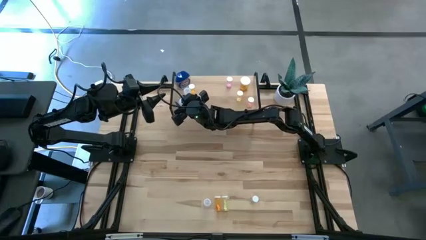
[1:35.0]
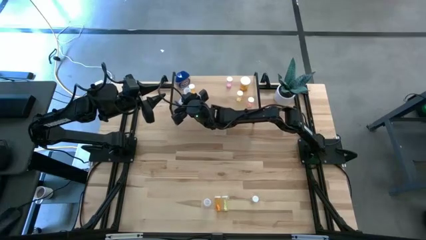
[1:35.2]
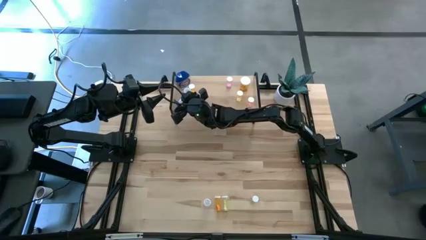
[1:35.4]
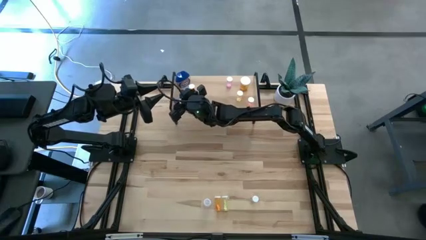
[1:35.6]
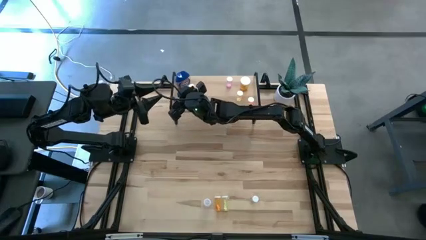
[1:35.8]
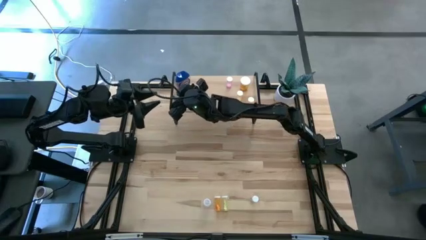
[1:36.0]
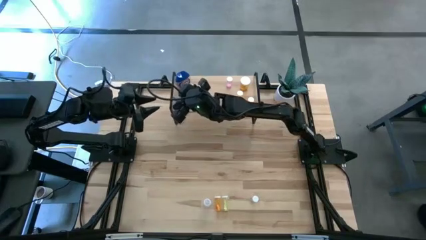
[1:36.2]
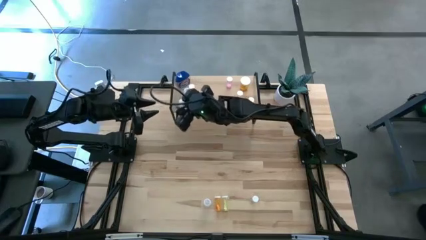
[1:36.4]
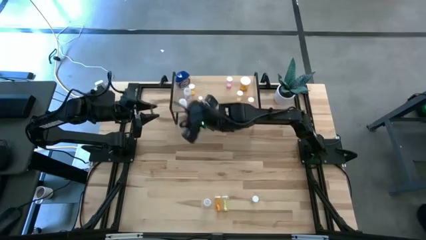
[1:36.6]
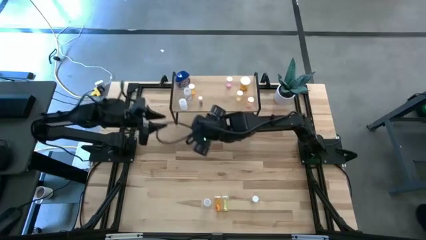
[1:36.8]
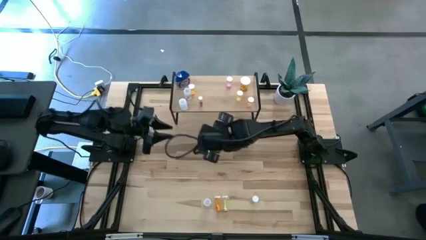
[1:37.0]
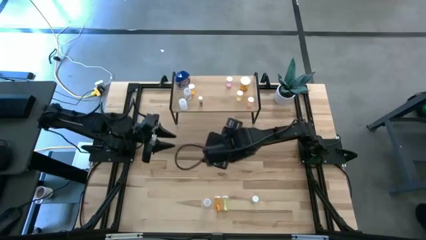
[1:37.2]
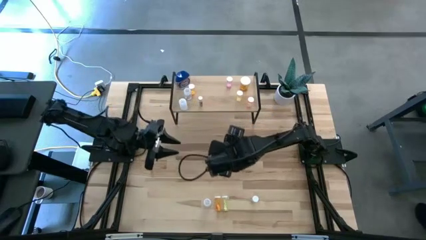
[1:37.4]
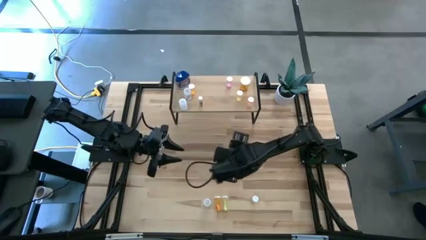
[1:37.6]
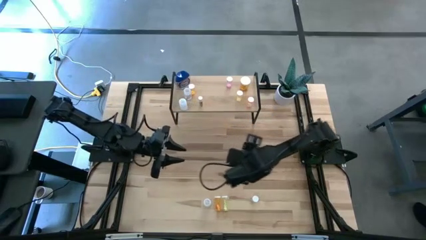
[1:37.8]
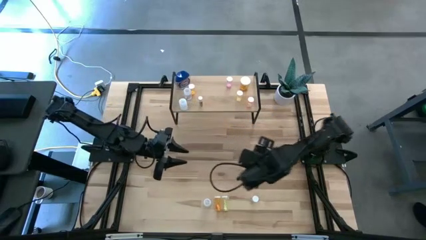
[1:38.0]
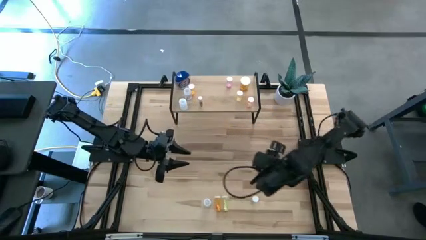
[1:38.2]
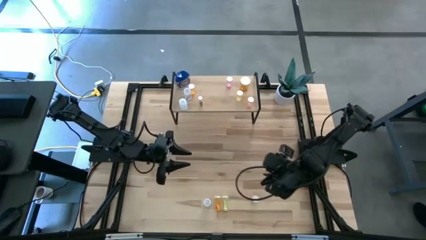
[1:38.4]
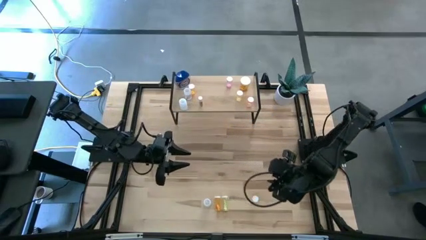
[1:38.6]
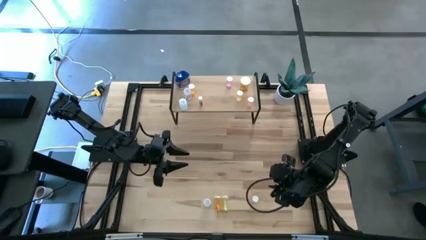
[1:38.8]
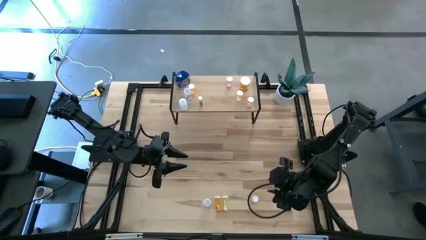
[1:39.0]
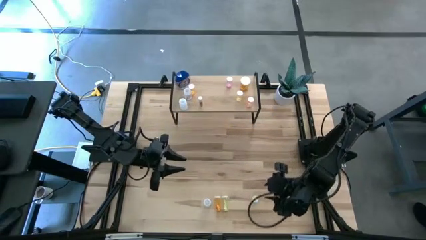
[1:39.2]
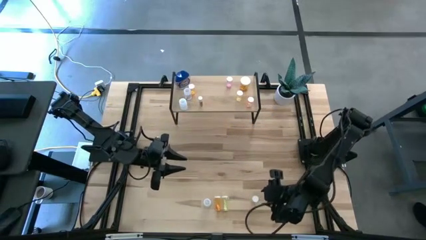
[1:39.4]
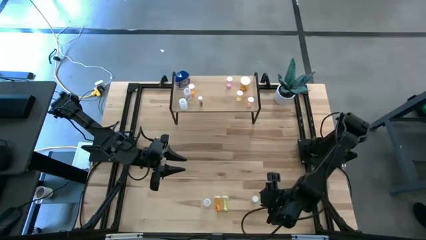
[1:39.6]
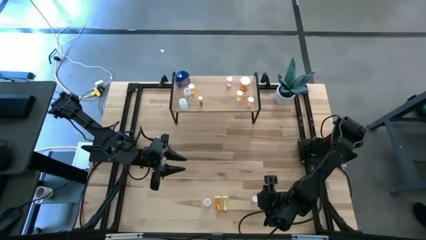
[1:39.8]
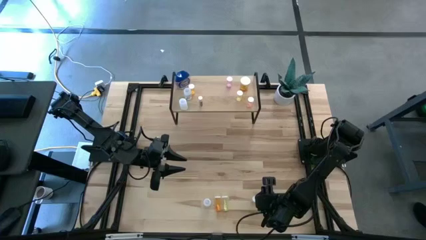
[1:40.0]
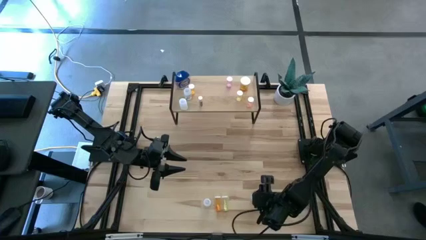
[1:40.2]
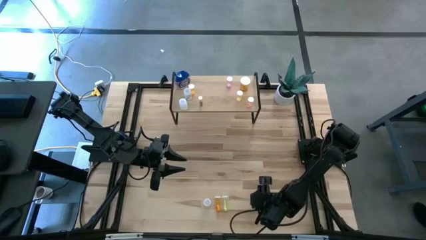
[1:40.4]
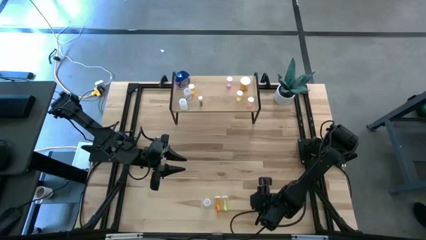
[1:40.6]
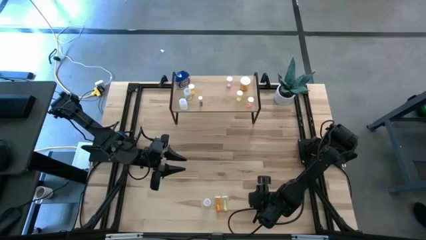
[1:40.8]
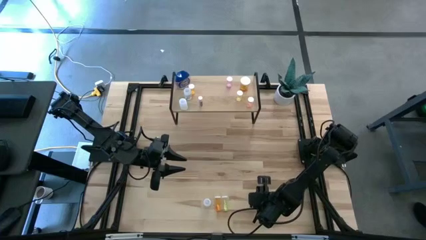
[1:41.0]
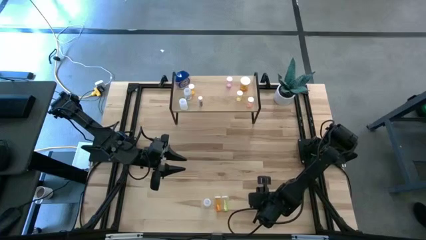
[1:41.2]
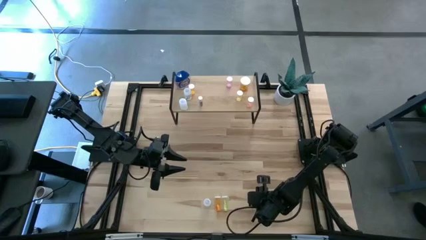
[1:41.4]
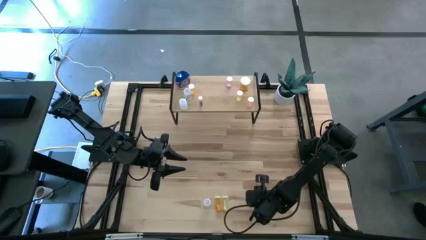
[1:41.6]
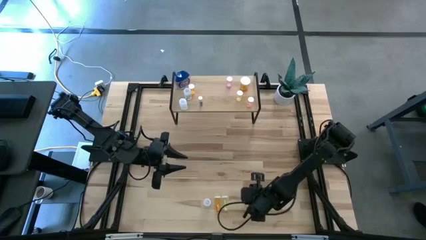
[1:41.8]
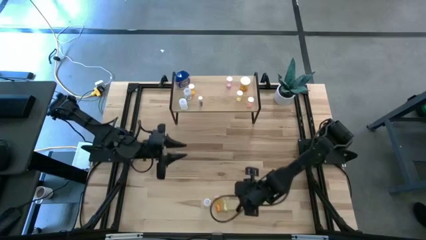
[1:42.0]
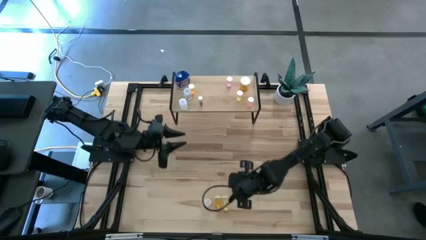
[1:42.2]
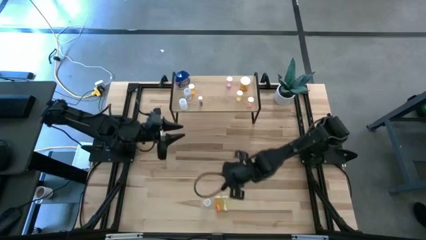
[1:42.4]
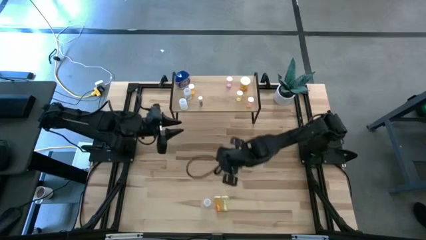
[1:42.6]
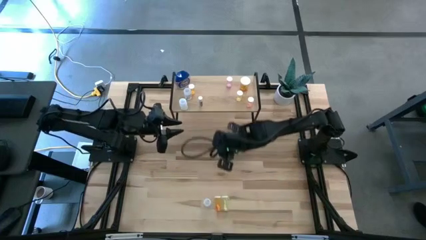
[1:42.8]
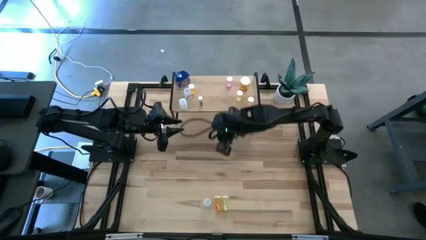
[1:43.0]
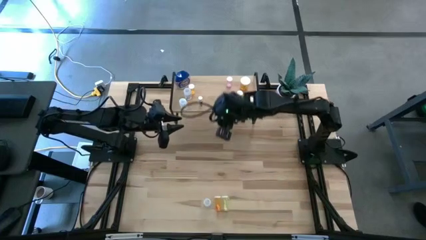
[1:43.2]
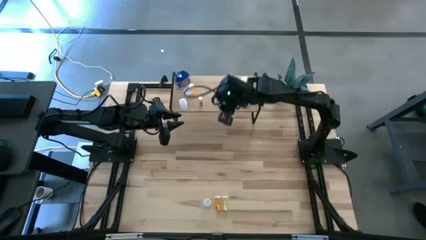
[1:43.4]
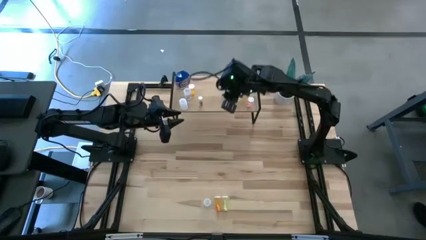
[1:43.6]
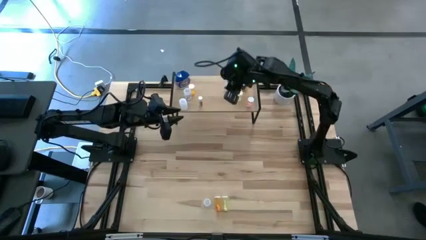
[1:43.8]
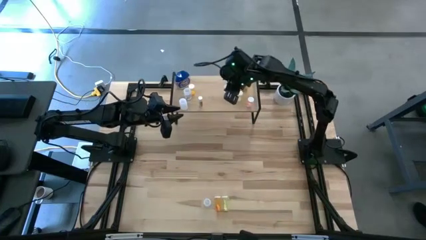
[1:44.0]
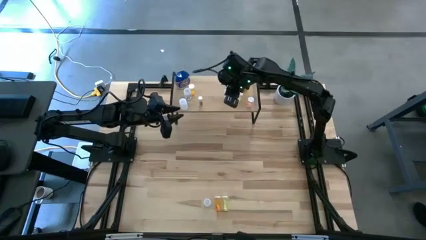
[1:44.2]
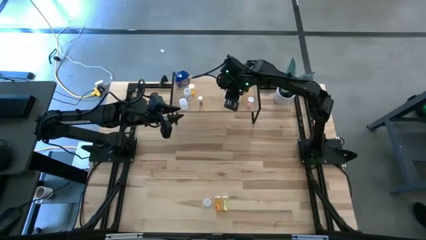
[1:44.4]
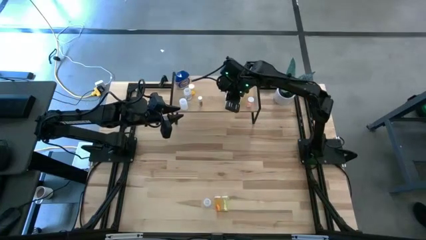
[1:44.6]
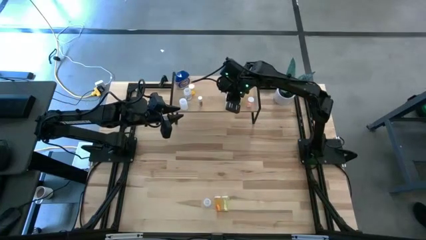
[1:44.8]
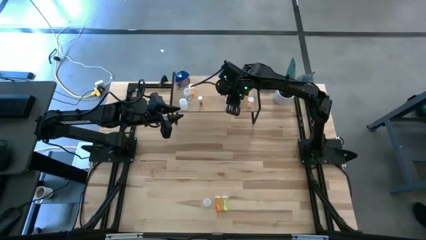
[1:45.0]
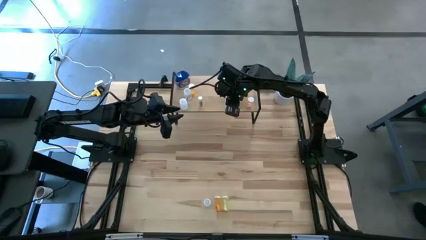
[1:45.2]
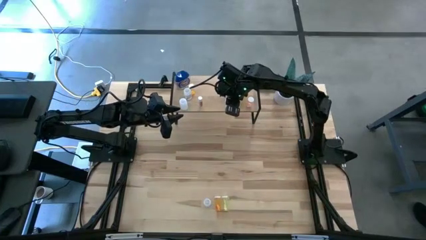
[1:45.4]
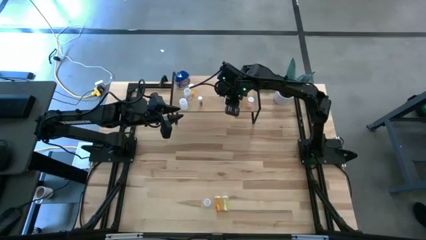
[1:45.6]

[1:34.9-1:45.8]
Task: Pick and place medicine bottles onto shelf by color
Put the right yellow pill bottle on the shelf

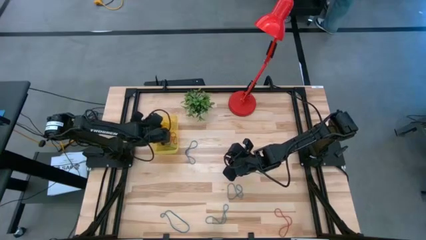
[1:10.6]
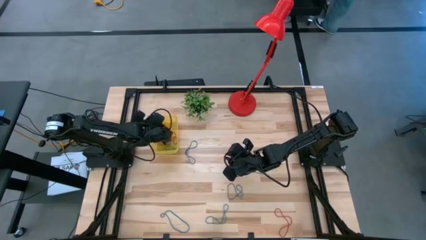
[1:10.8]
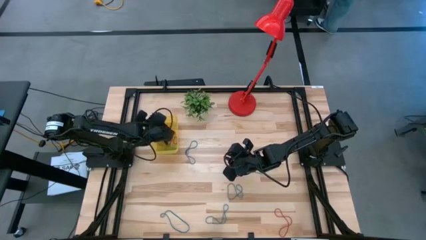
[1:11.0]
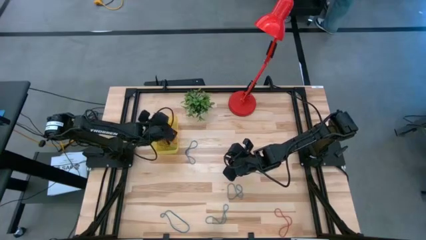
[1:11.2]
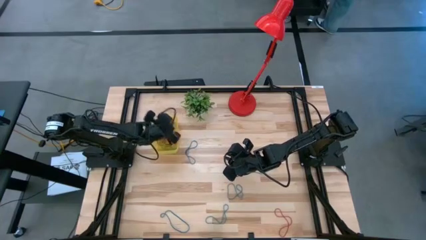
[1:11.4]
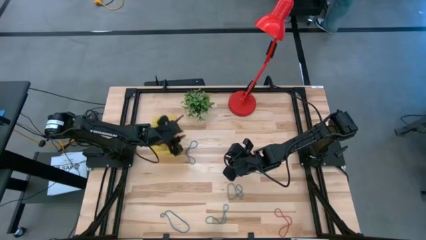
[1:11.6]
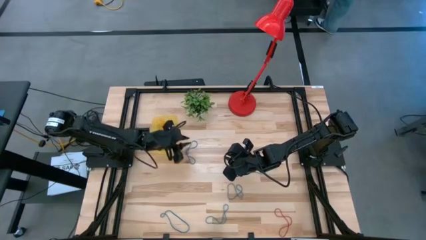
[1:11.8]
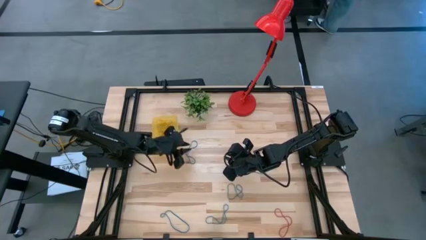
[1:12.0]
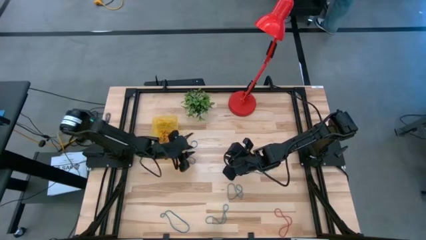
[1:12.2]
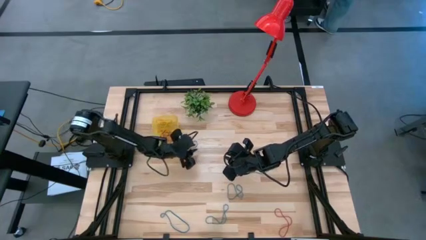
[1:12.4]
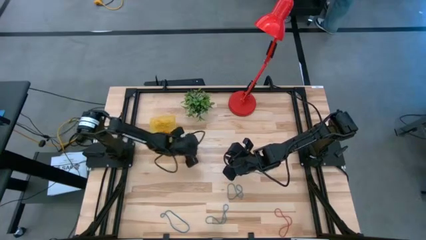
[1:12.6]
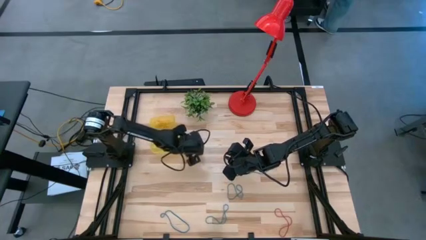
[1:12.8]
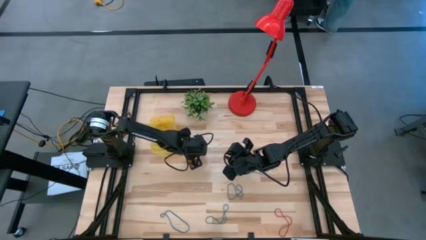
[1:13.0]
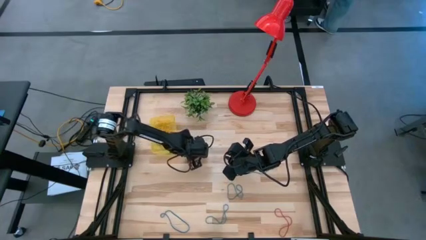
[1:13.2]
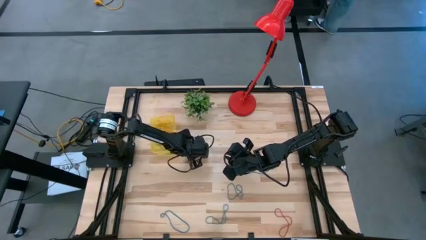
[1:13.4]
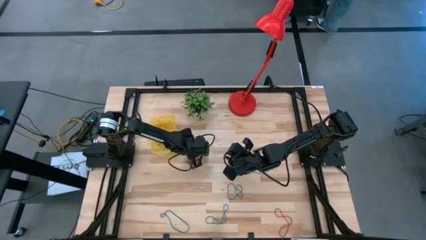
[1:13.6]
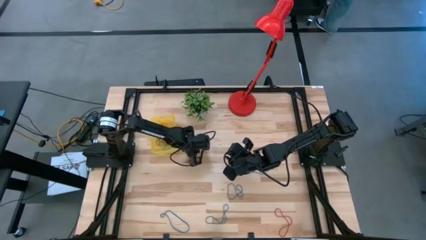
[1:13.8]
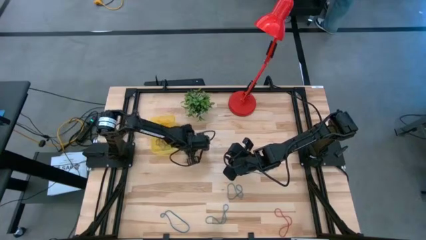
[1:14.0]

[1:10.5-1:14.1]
Task: Pick and place items into bin
Put the blue rubber band into the yellow bin

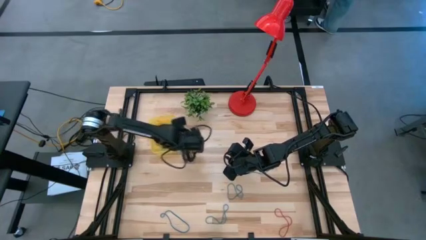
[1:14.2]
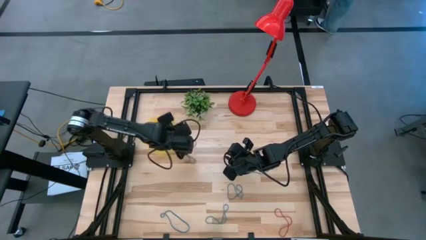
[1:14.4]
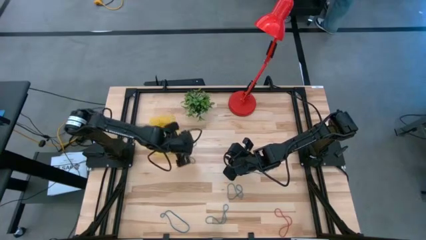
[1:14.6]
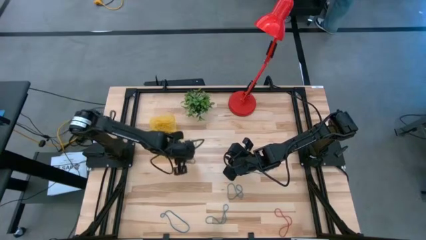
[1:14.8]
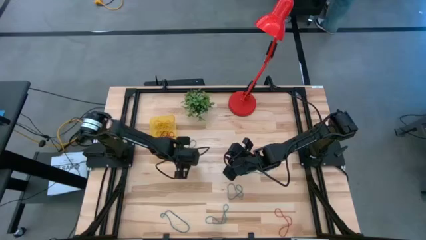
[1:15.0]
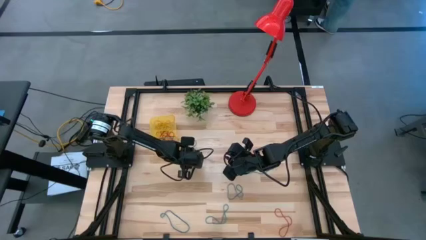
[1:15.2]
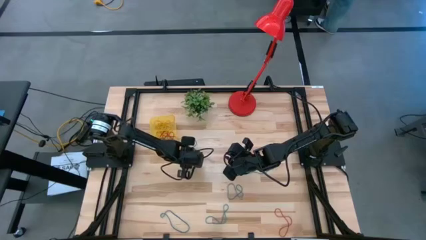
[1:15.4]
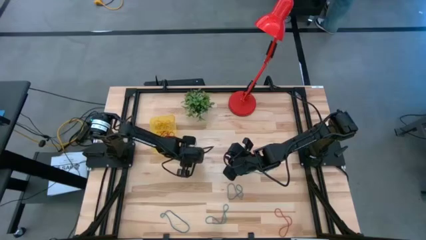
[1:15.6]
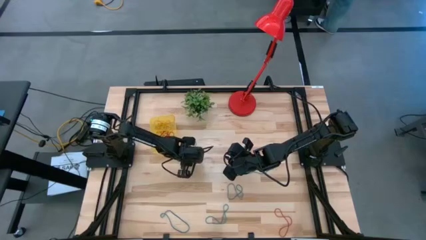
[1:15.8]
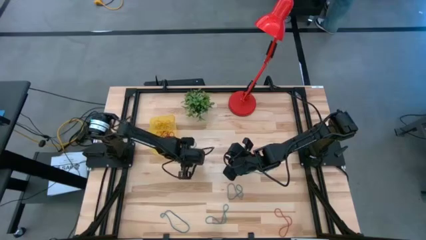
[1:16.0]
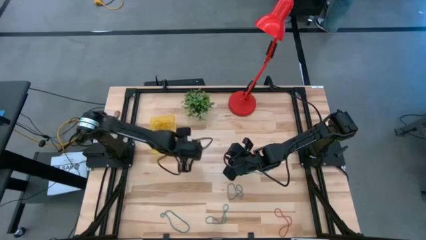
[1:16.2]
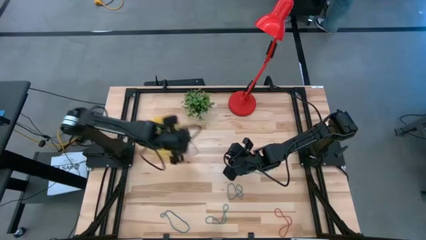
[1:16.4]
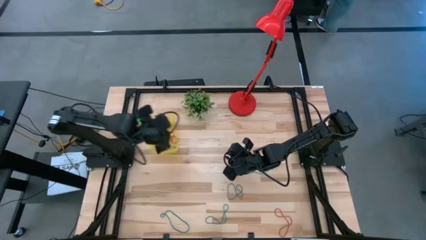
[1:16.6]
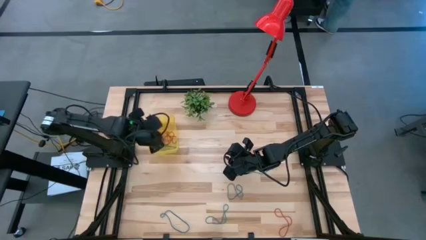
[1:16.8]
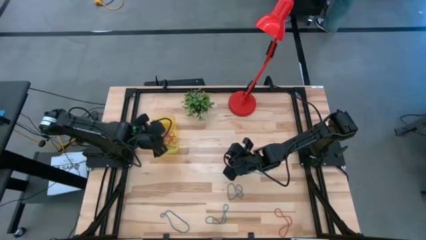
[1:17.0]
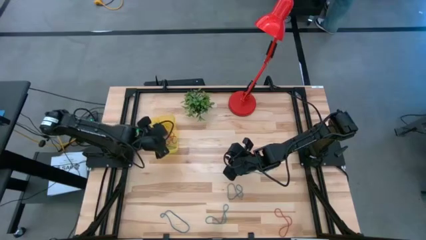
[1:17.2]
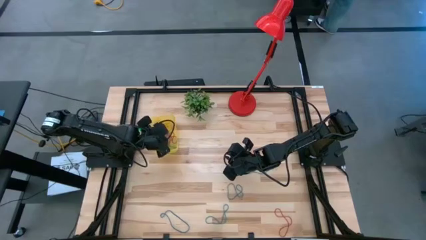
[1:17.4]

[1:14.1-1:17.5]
Put the blue rubber band into the yellow bin
